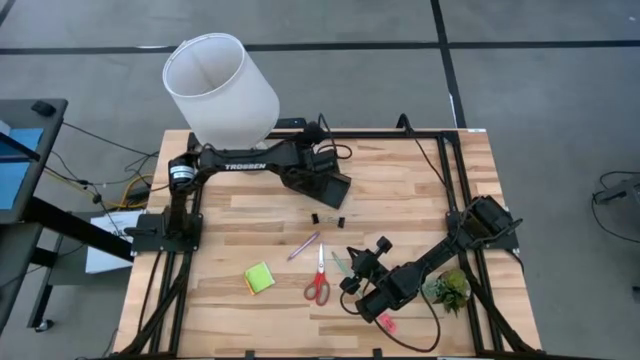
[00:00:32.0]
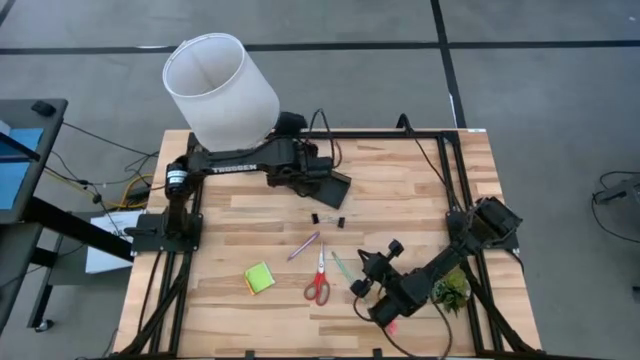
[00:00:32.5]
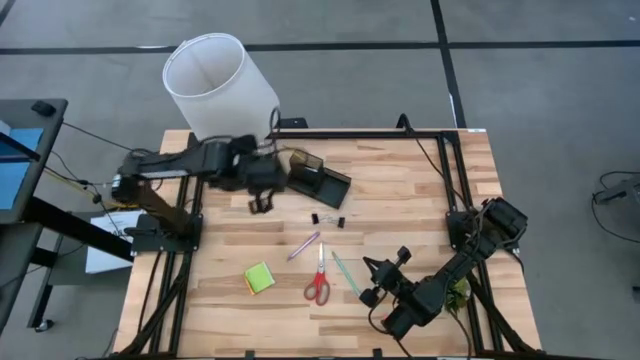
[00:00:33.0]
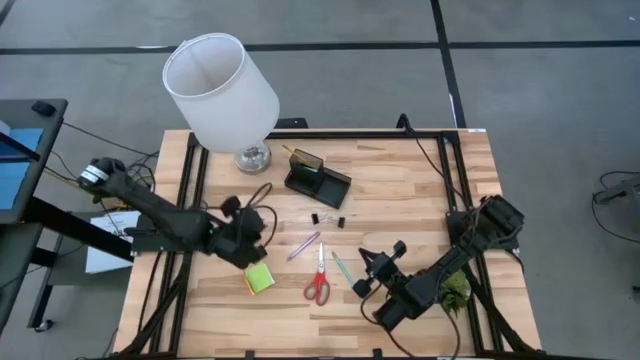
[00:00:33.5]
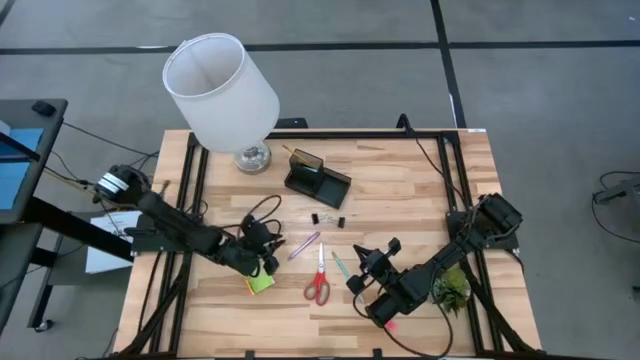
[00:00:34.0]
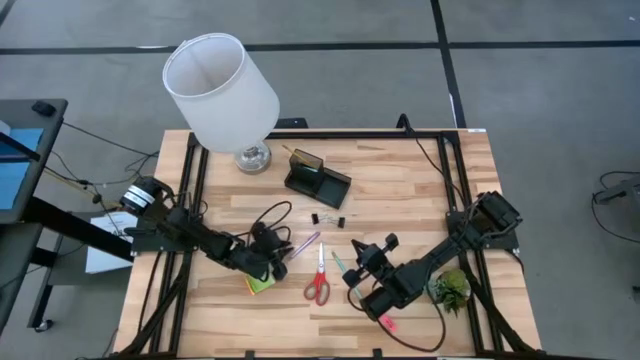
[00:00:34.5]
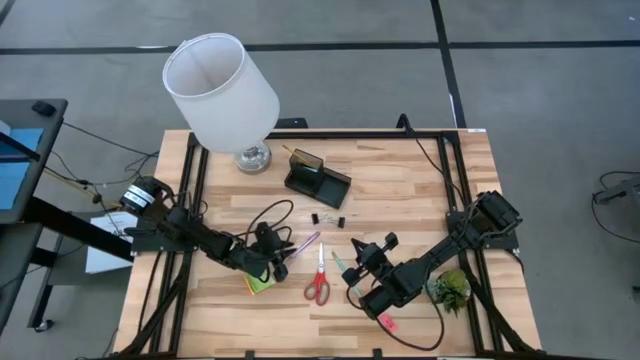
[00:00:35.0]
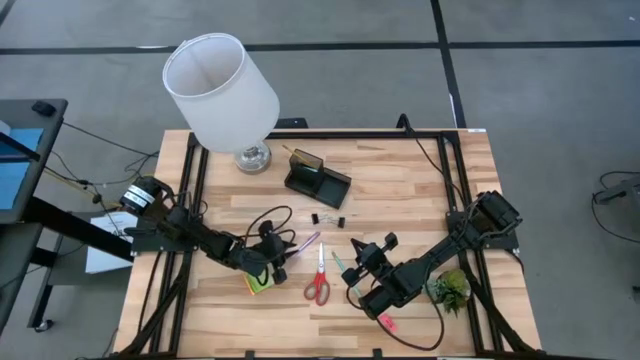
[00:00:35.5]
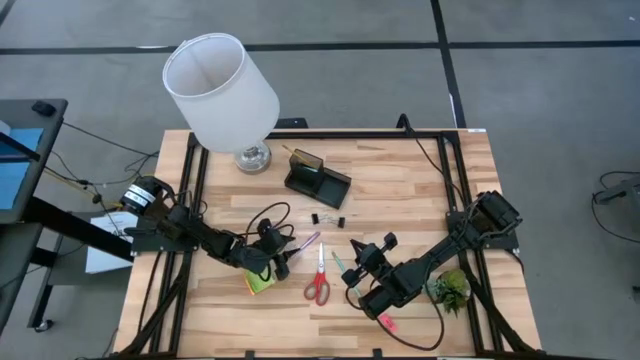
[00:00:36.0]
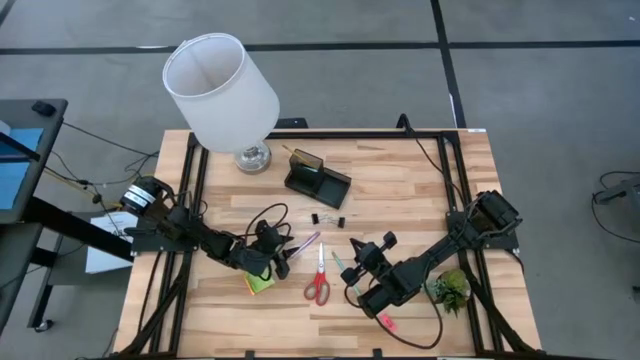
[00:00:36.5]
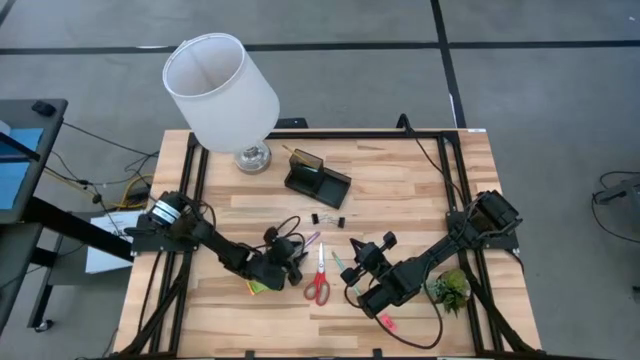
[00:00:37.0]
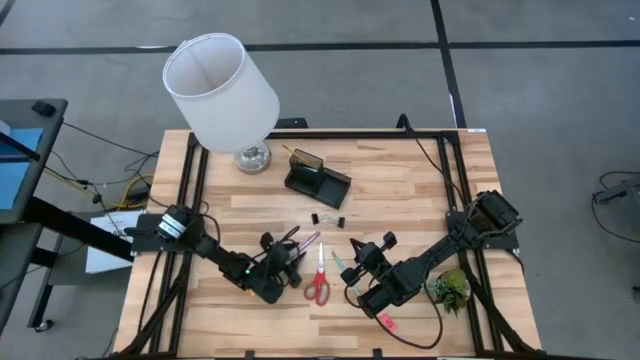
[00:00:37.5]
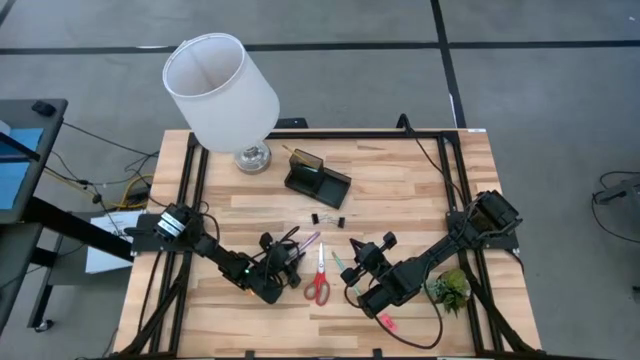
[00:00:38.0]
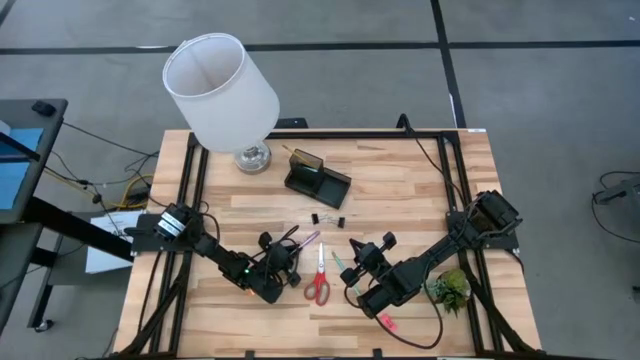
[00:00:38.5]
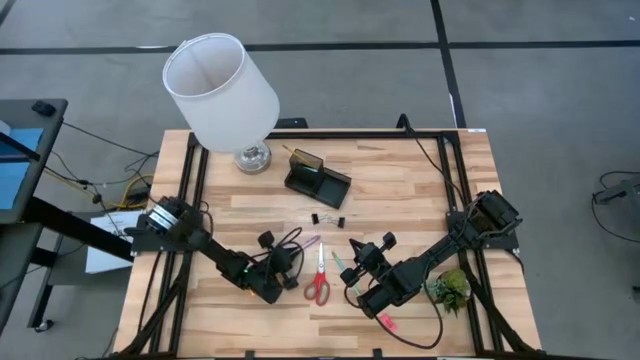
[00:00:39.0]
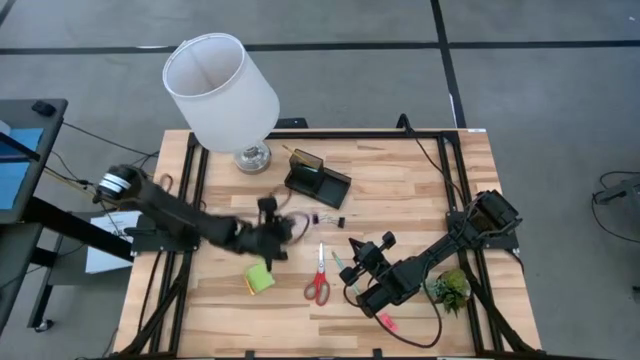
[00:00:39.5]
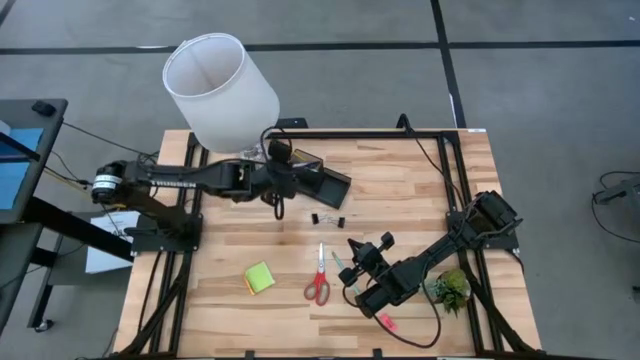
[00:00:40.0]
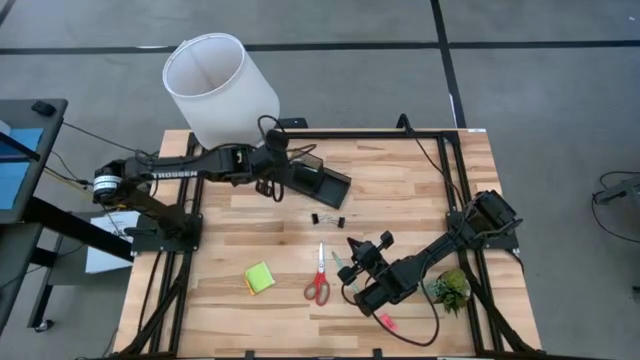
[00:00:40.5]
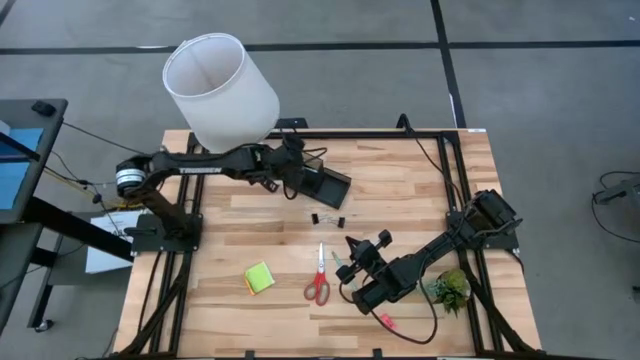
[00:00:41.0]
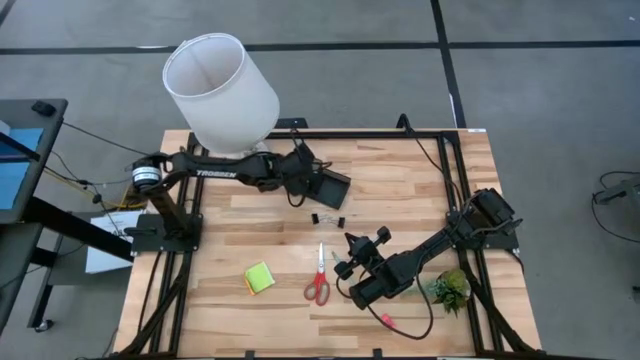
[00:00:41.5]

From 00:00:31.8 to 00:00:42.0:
Task: Pick and place office supplies into organizer
Put the purple pen into the black desk organizer

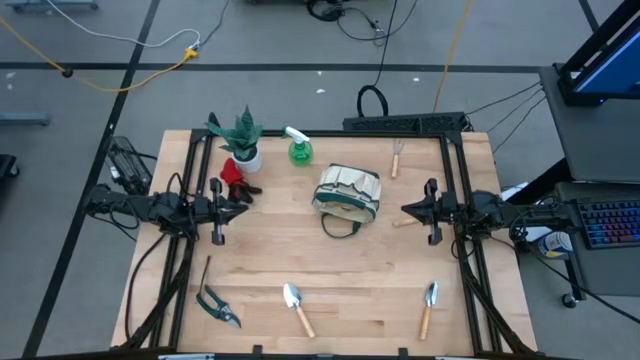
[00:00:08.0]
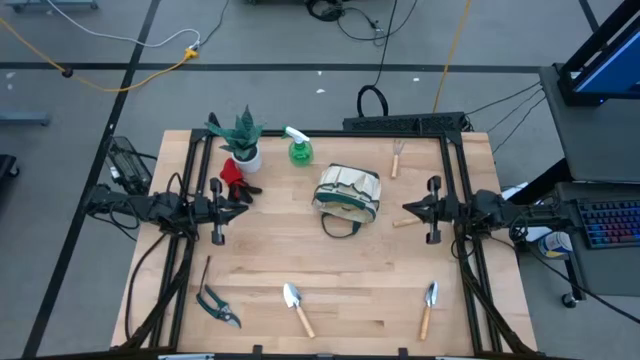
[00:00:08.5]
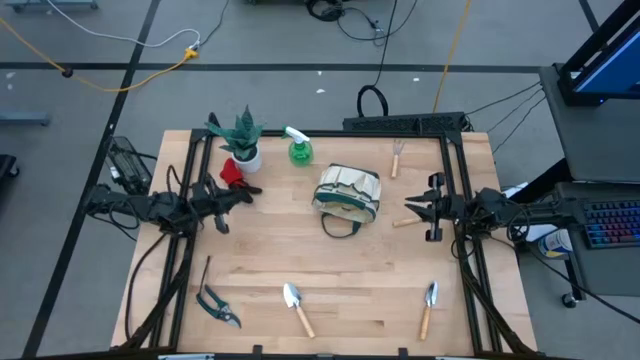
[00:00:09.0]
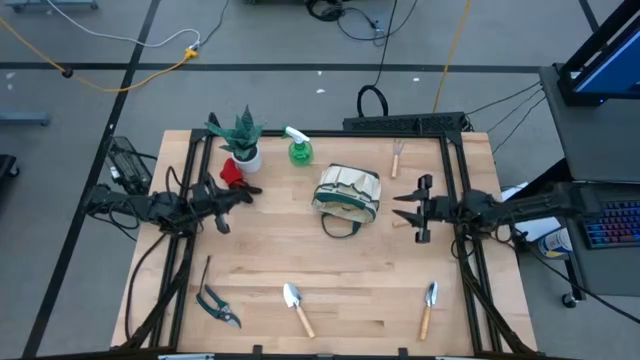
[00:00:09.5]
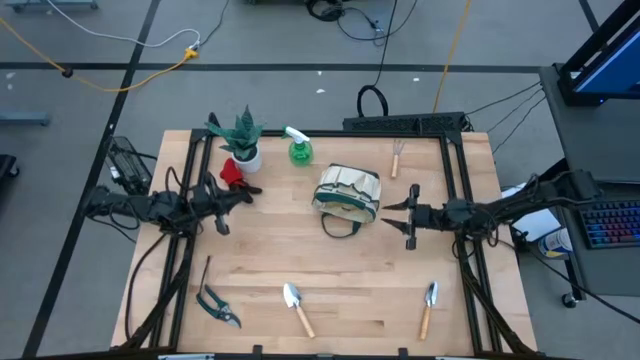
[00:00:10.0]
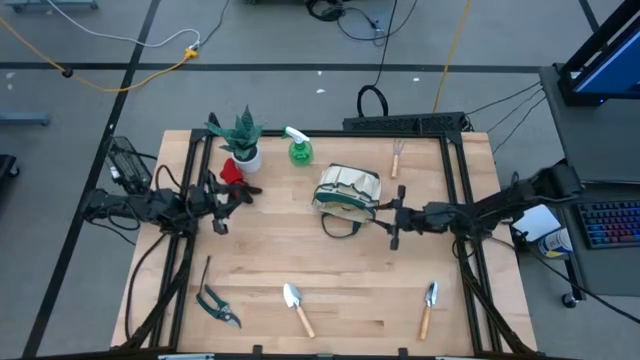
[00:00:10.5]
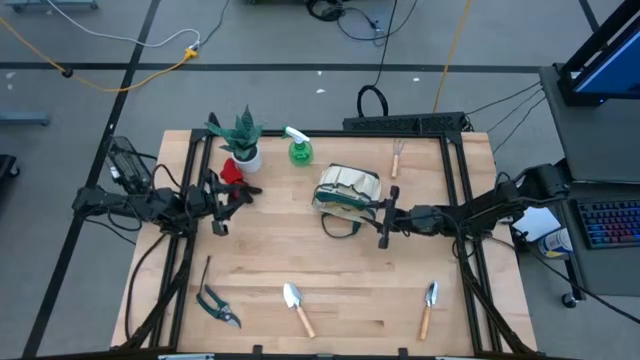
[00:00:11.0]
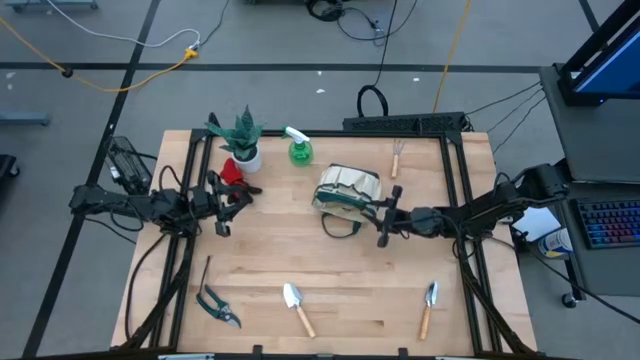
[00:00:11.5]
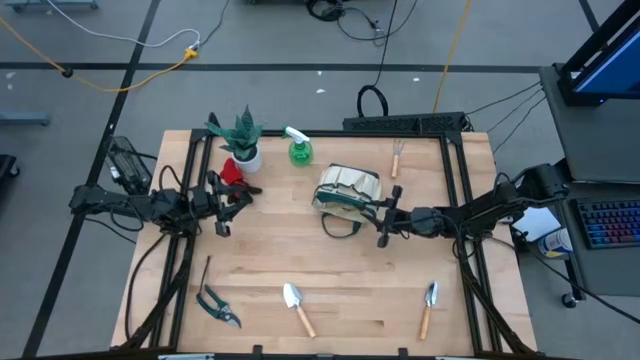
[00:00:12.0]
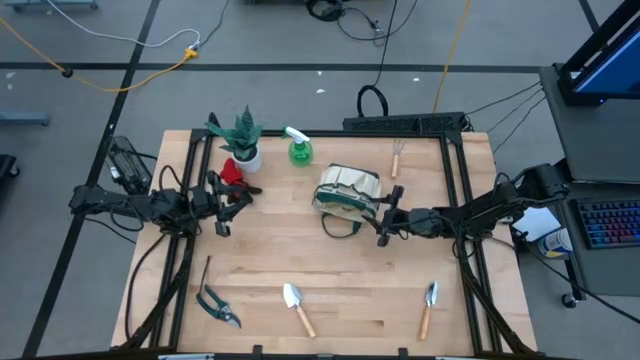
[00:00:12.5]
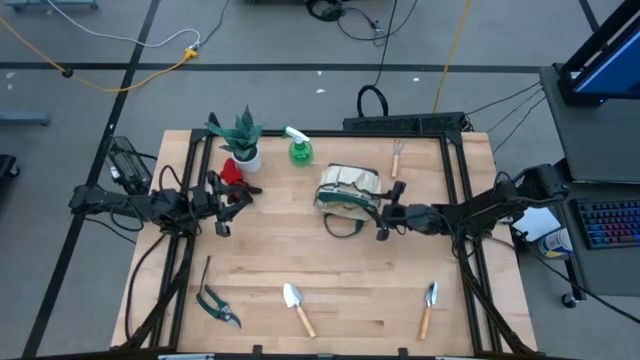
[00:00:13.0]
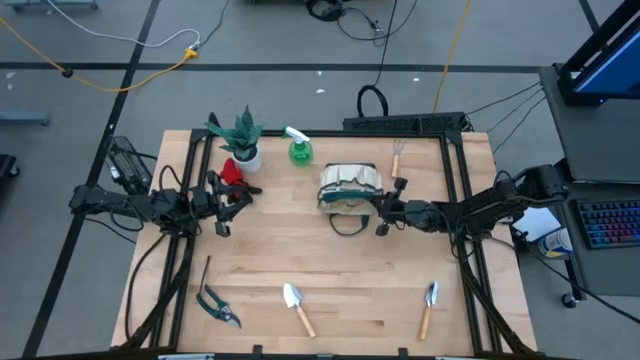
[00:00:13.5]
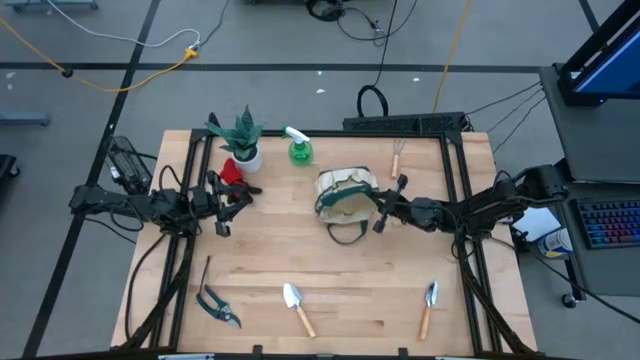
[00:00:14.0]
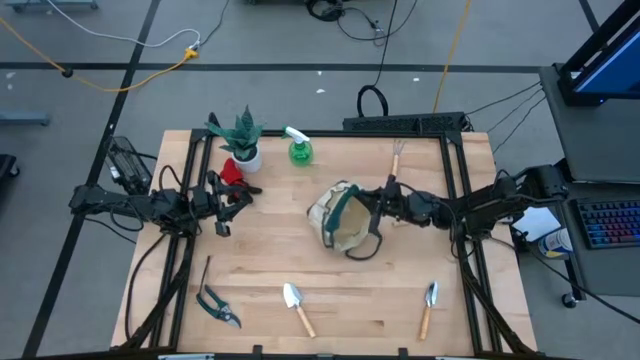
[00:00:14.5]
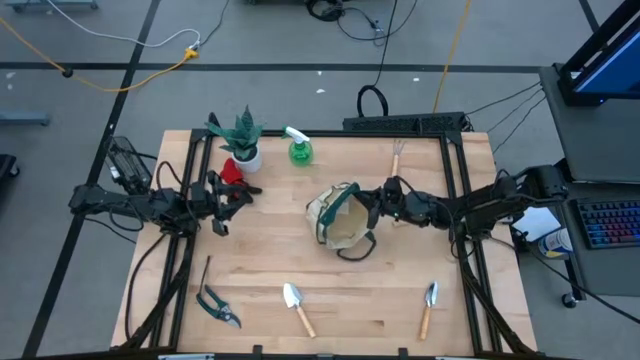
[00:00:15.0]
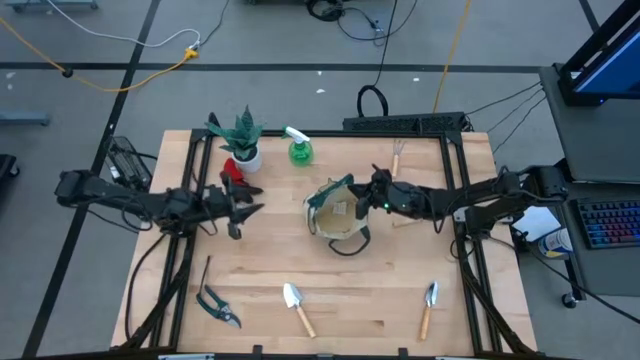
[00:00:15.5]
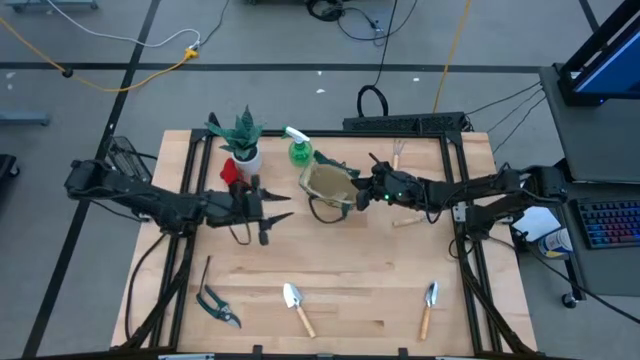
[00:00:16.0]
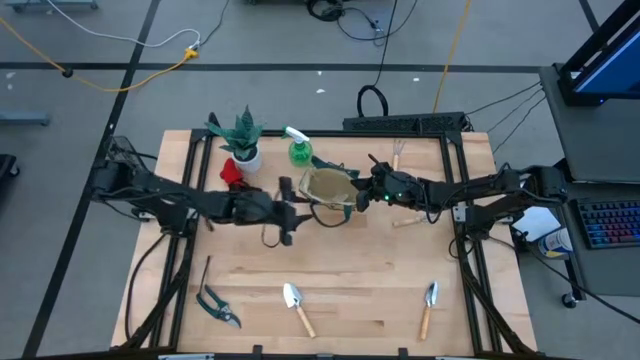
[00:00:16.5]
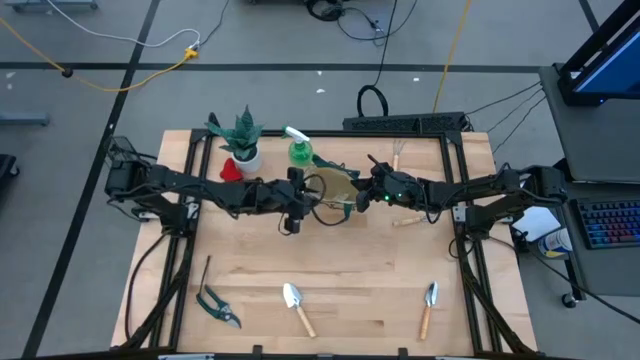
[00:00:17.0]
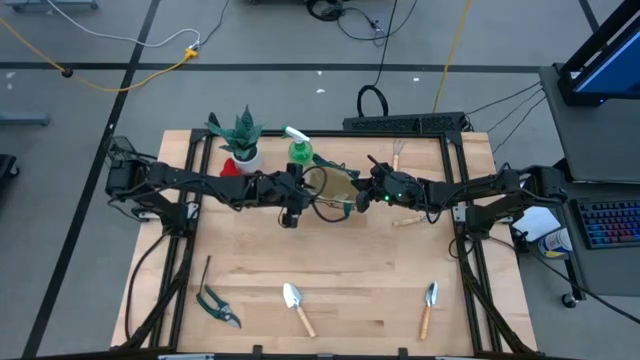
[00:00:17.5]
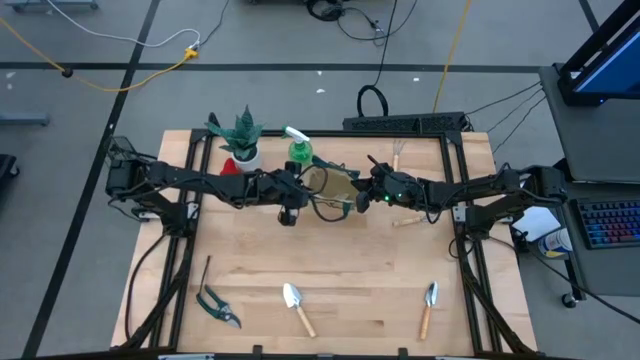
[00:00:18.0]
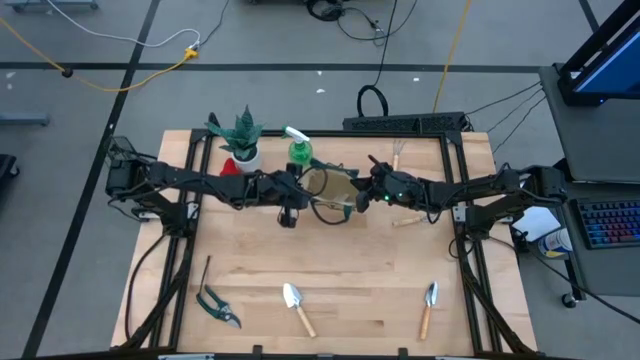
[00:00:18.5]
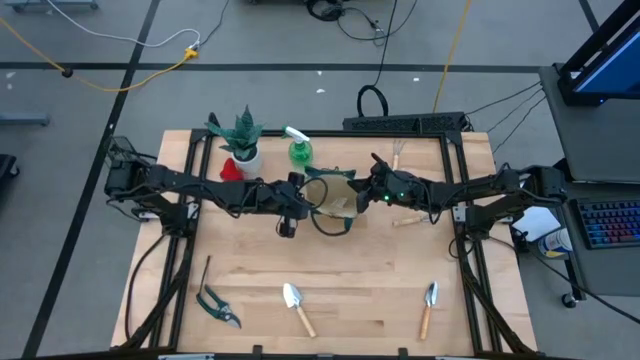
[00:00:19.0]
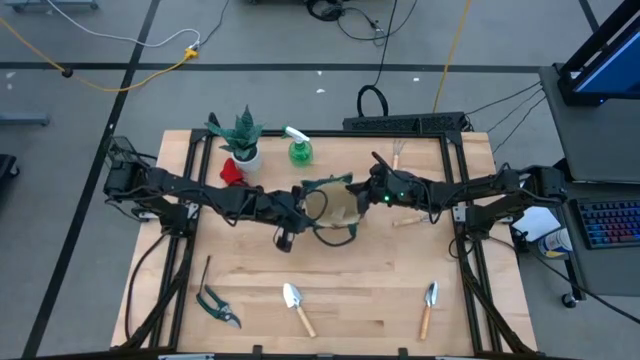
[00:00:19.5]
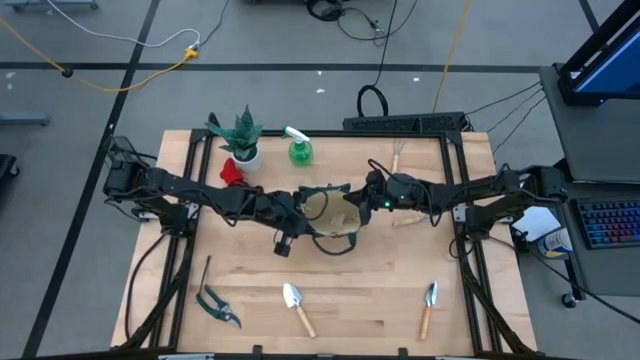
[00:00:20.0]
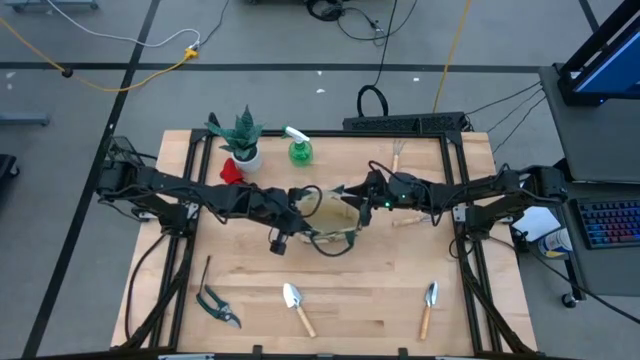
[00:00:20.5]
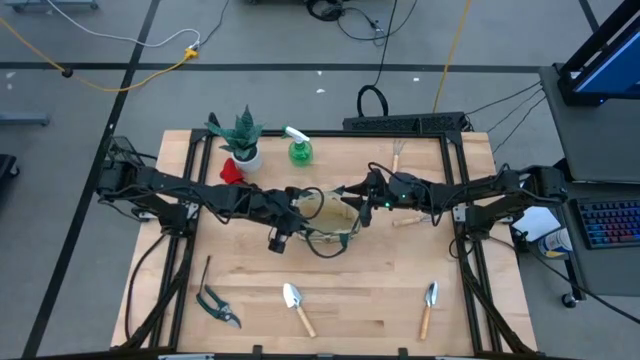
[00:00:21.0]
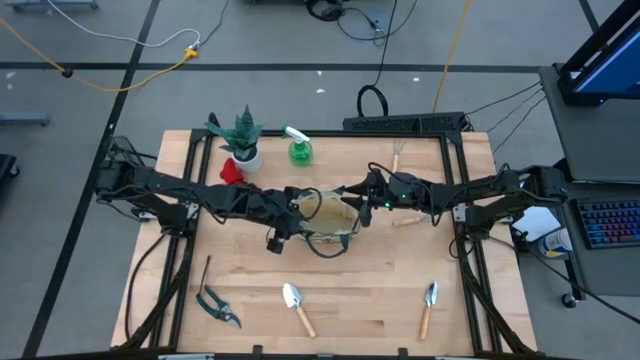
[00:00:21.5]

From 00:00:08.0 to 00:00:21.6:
Task: Pick & Place Garden tools in Gardening bag
Prepare the gardening bag
